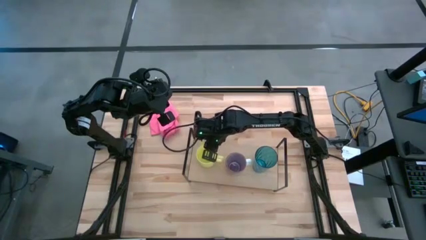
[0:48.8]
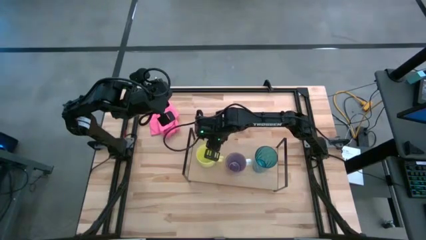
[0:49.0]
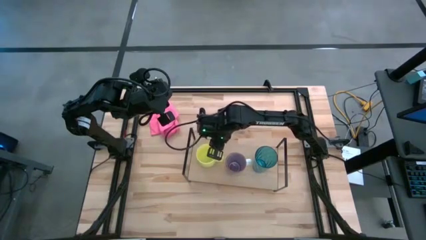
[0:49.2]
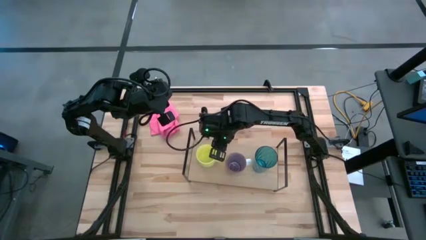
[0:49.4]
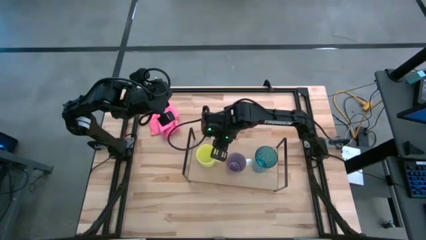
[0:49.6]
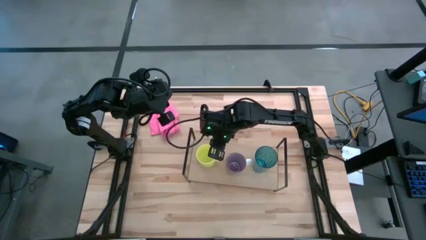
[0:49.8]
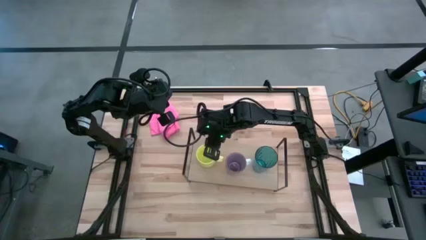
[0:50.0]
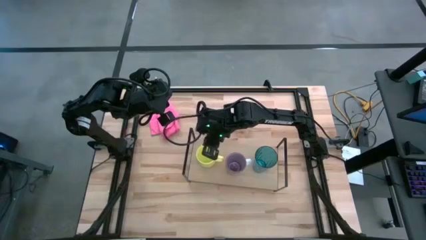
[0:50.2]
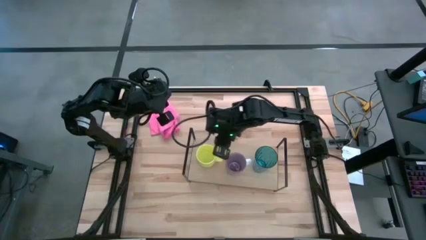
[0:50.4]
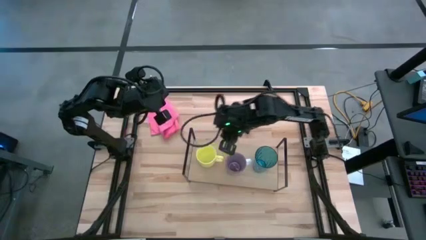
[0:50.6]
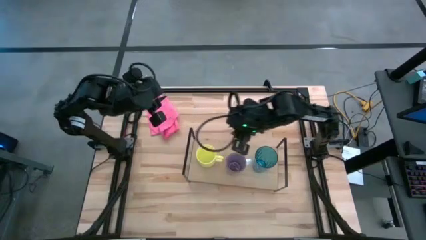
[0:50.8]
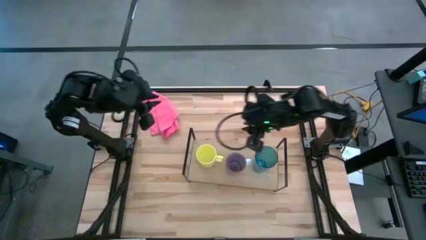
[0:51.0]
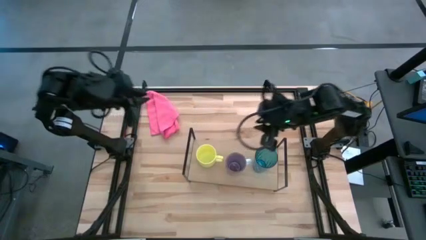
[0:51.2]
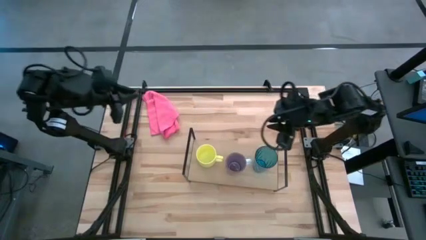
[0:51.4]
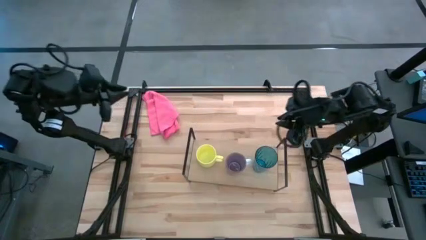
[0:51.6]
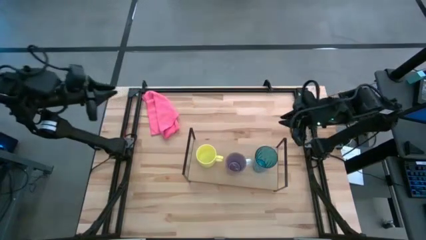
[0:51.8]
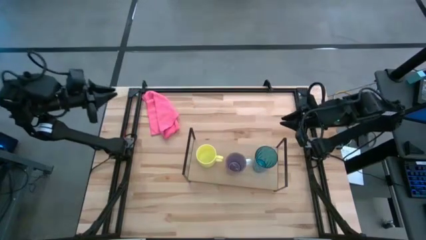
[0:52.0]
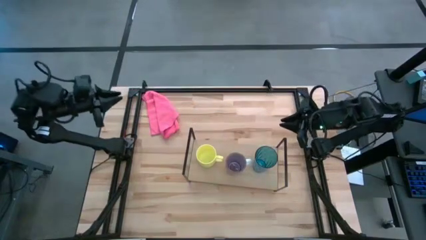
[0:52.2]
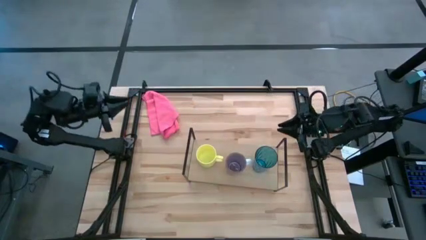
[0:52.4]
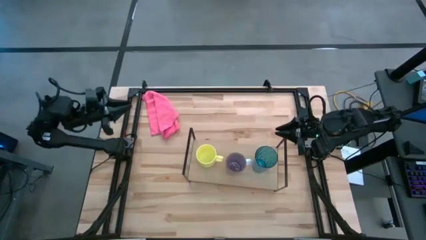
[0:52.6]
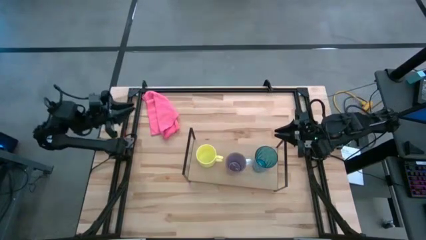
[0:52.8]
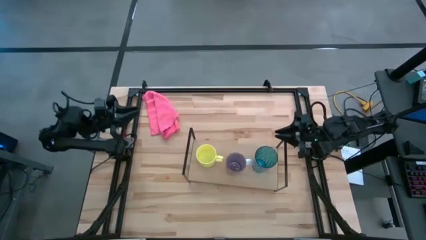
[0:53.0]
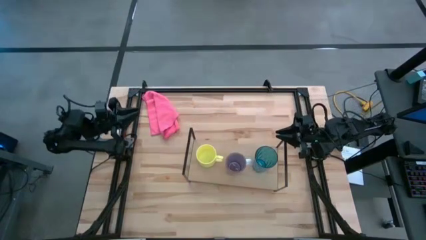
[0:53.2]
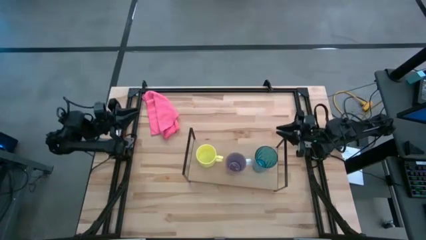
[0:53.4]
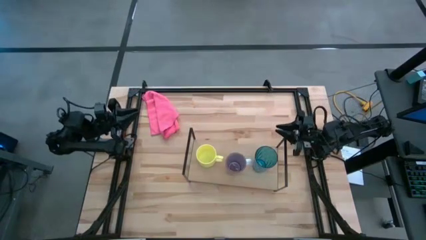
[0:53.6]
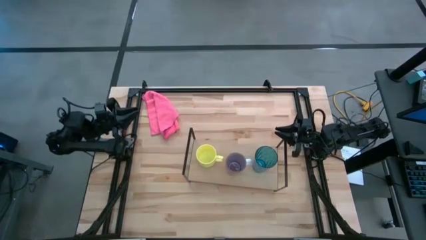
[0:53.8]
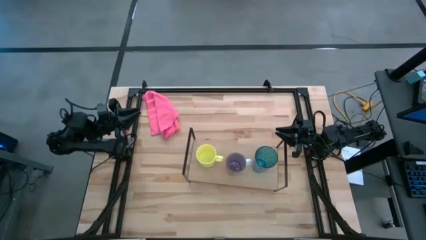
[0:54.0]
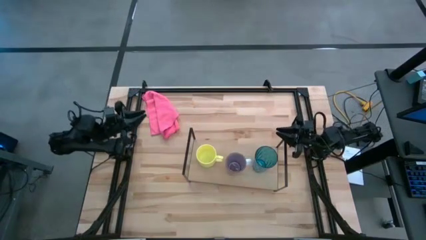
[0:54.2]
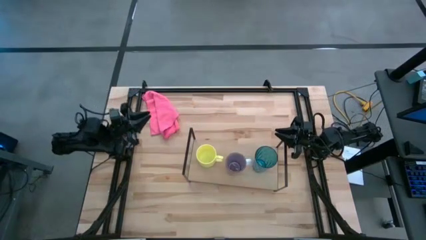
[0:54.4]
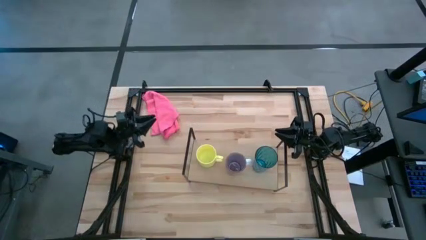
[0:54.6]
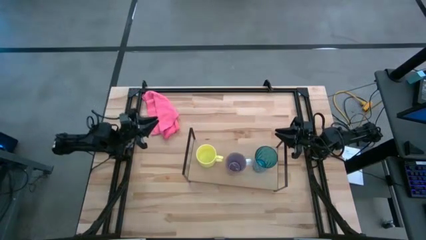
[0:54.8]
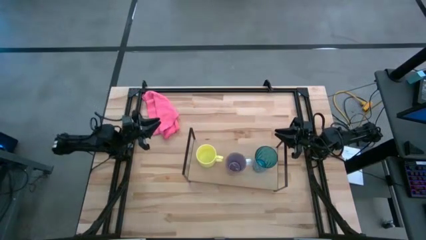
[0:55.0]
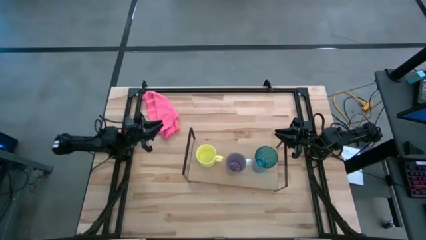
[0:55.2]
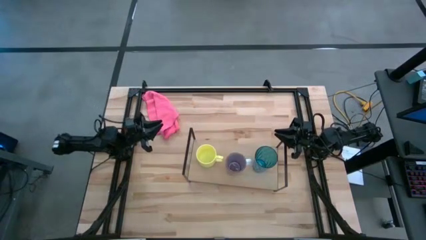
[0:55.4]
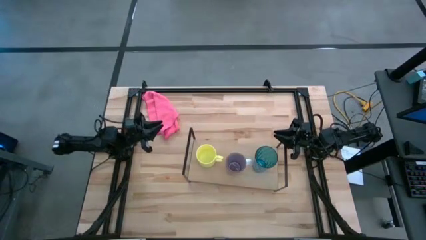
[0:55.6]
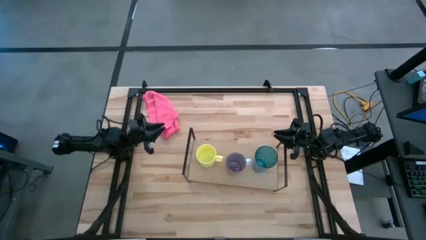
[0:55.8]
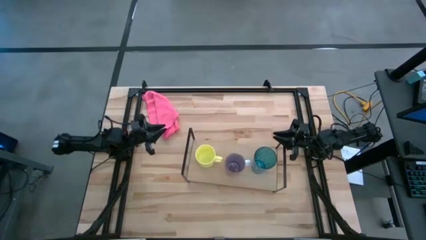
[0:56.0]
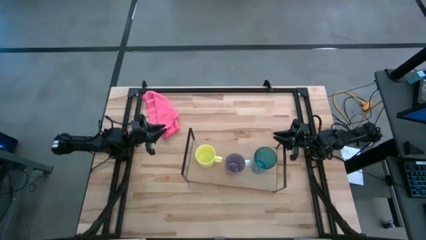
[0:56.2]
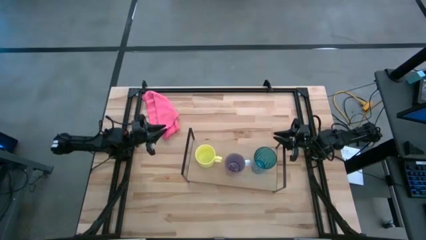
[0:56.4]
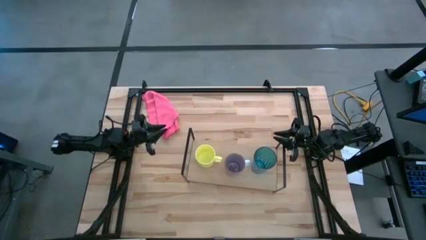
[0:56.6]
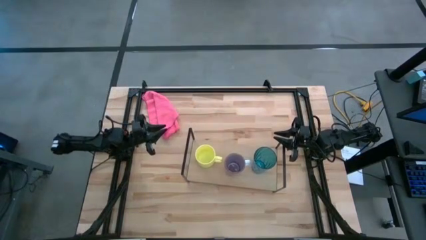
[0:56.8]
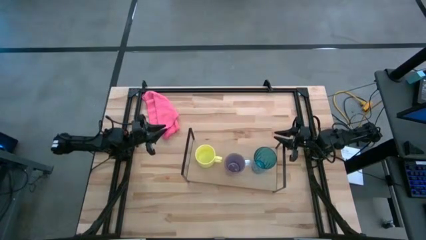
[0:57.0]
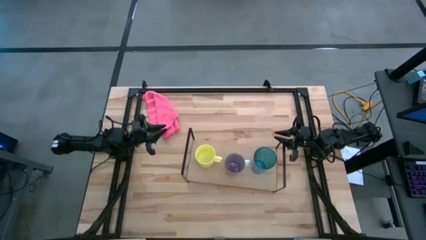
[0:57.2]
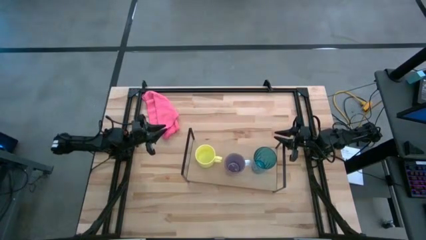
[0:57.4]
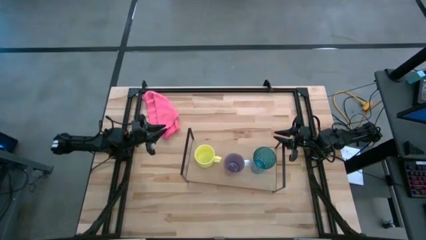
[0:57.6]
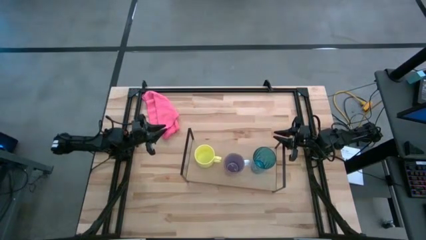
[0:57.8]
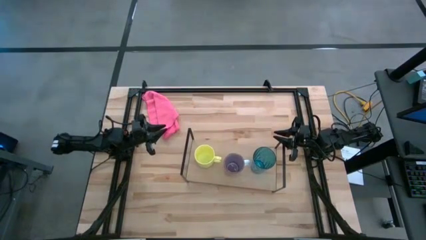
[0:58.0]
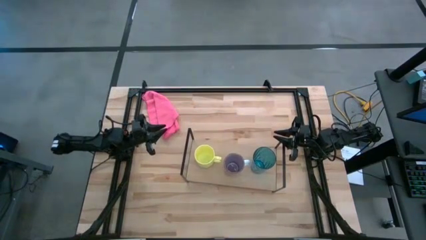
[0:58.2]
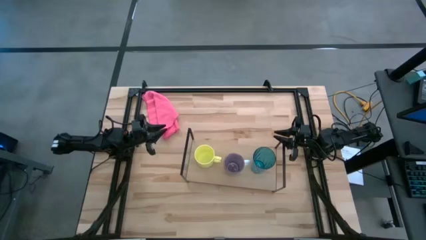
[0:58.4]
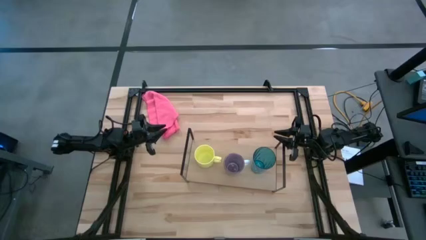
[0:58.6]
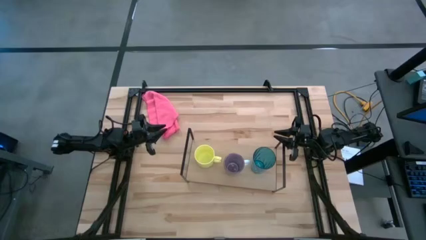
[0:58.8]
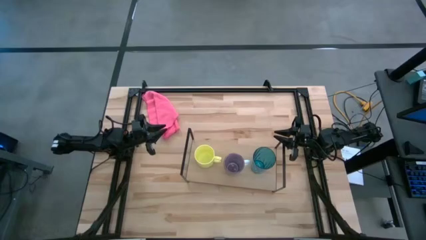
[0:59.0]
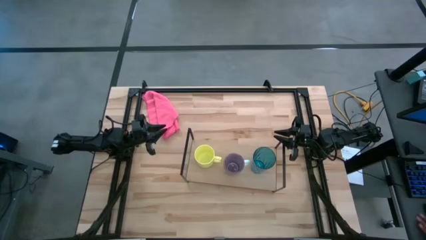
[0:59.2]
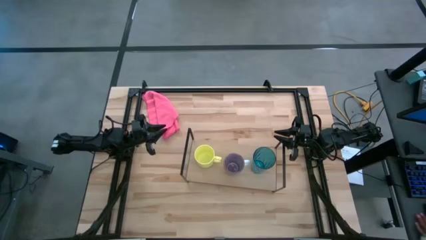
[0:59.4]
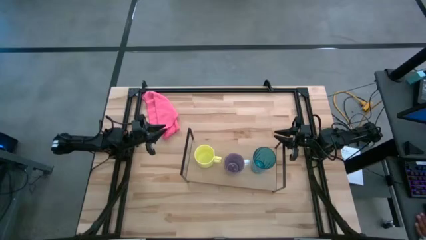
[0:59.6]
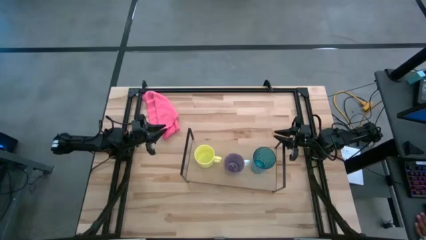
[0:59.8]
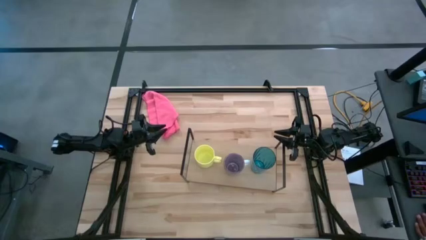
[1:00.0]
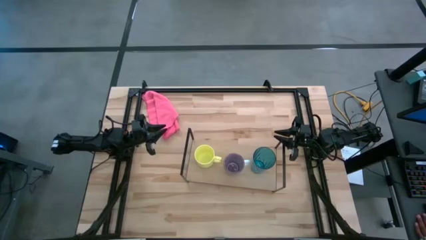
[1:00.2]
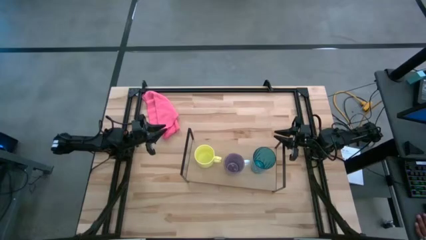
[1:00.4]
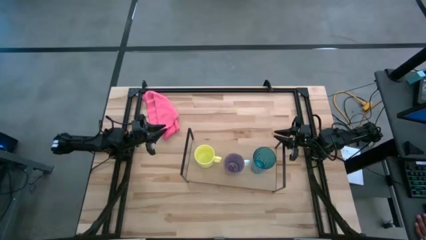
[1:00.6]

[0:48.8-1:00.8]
Task: Stack small to large cups/mugs on shelf
Return to Home Position
